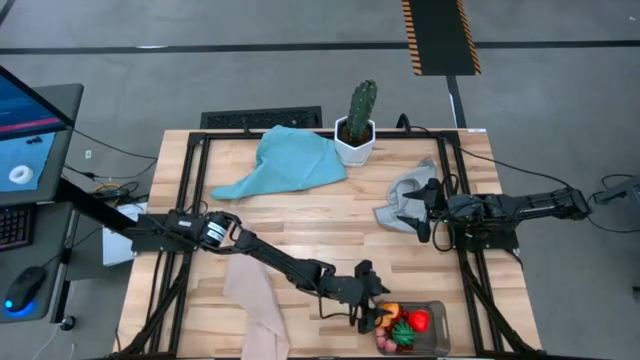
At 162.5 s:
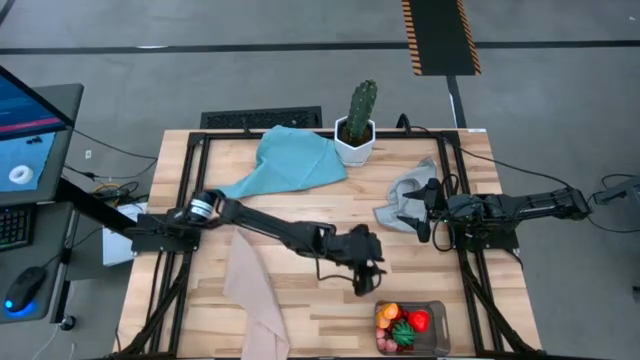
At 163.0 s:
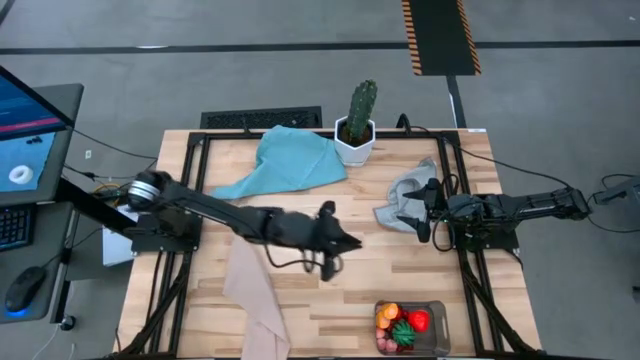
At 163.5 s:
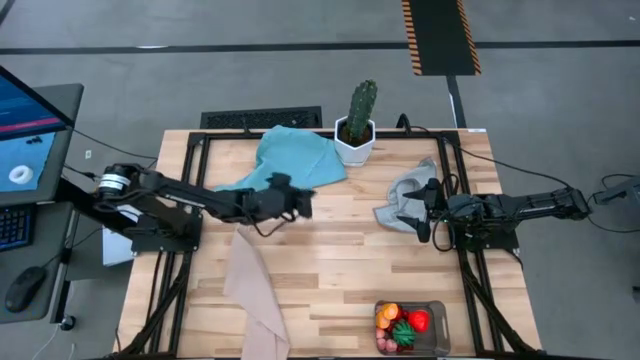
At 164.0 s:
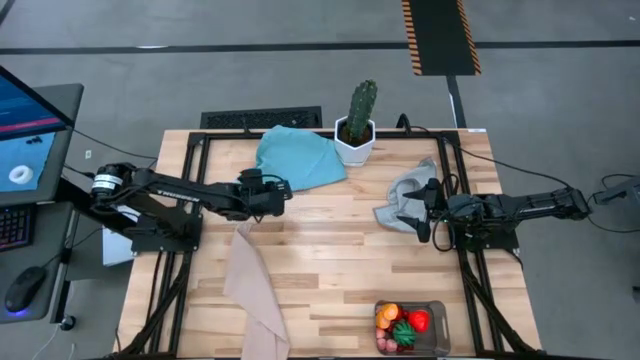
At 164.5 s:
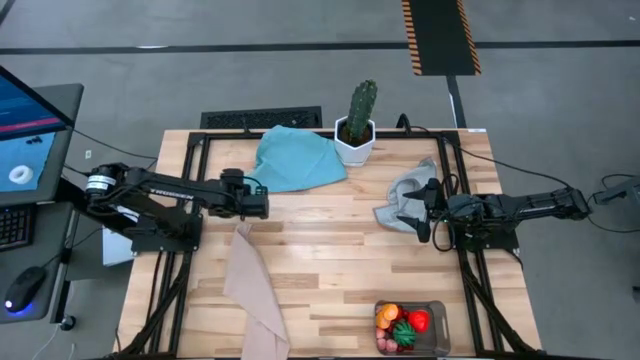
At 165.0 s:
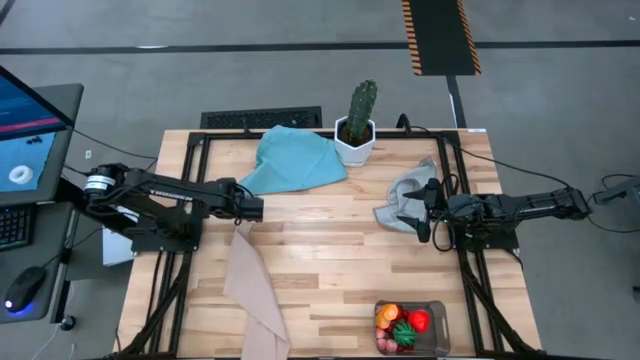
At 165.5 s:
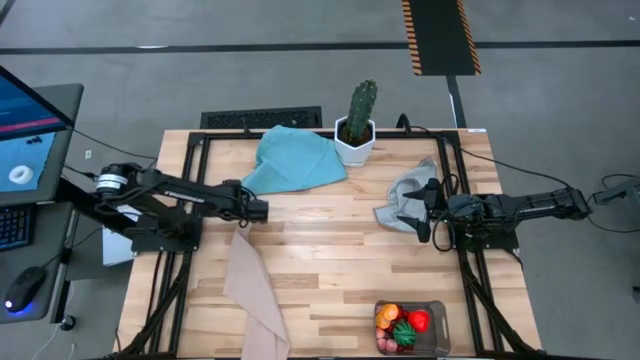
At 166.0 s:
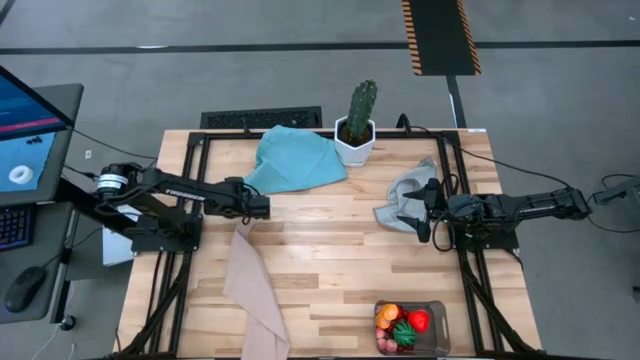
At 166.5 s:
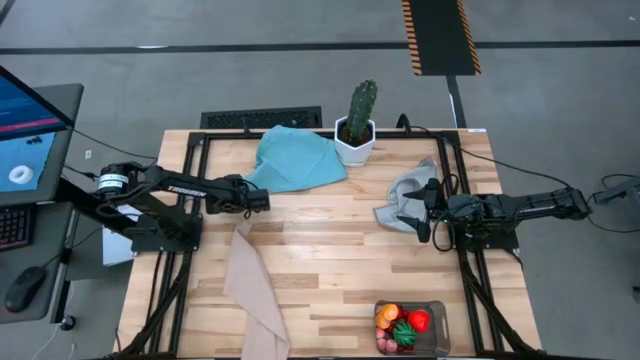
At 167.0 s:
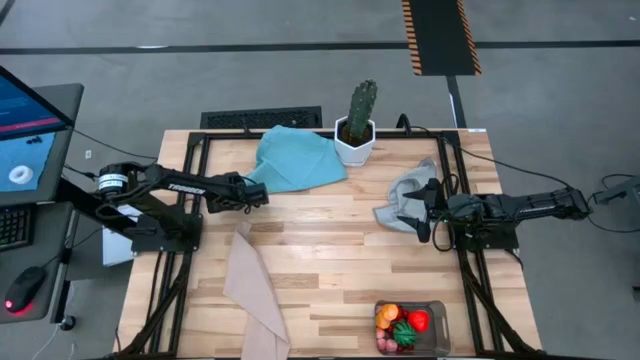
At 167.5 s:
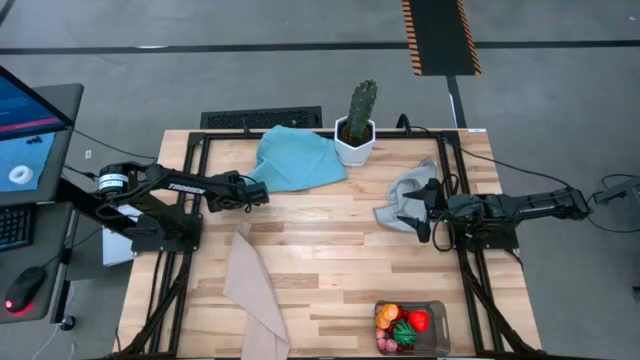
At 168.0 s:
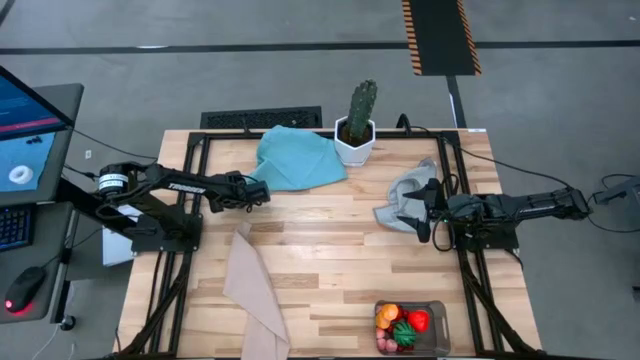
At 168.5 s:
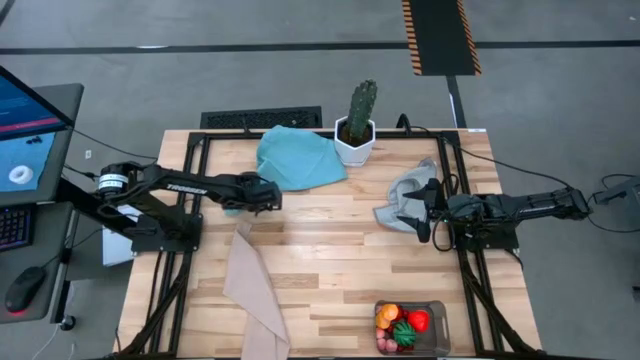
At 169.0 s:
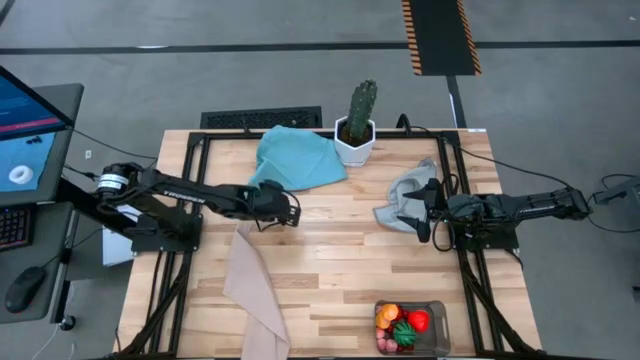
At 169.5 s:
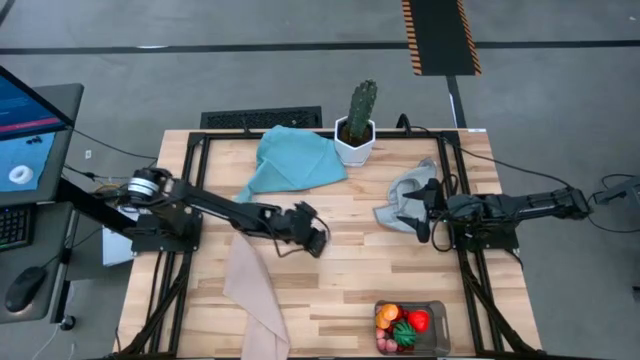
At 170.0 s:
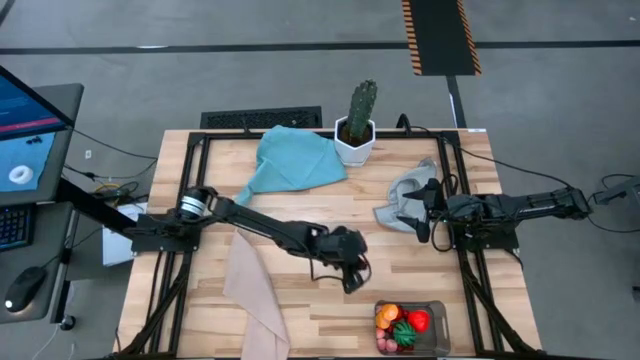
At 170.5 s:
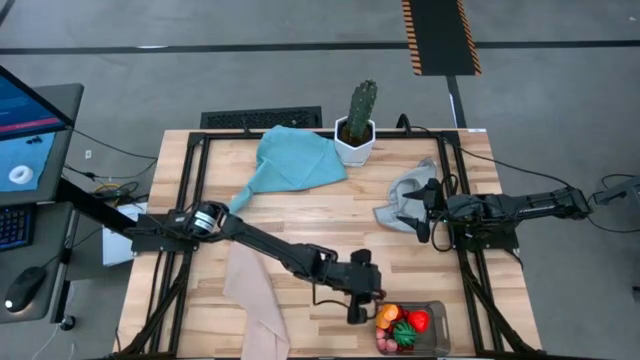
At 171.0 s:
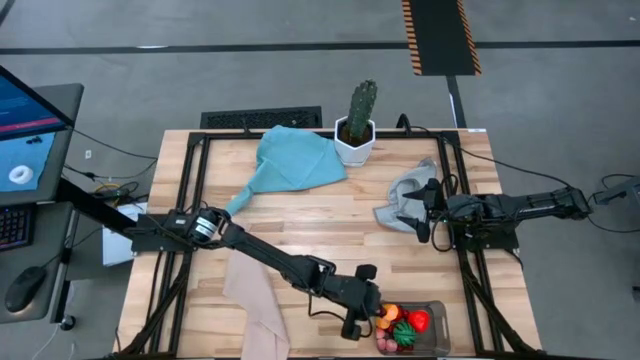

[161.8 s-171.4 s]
Task: Pick and placing Produce into tupperware
Put the cherry into the black bin

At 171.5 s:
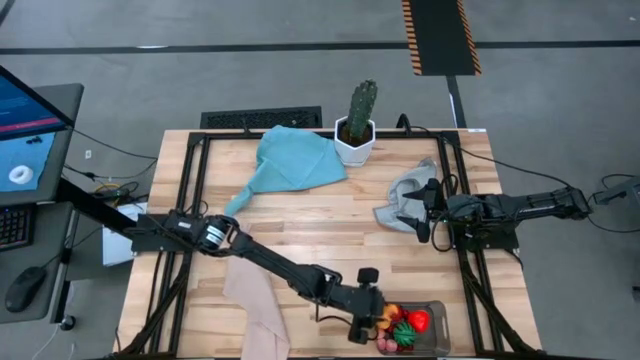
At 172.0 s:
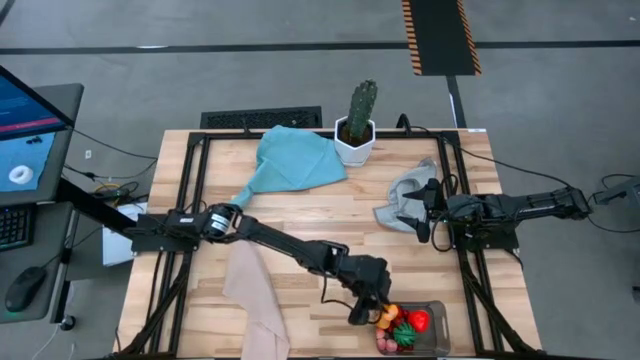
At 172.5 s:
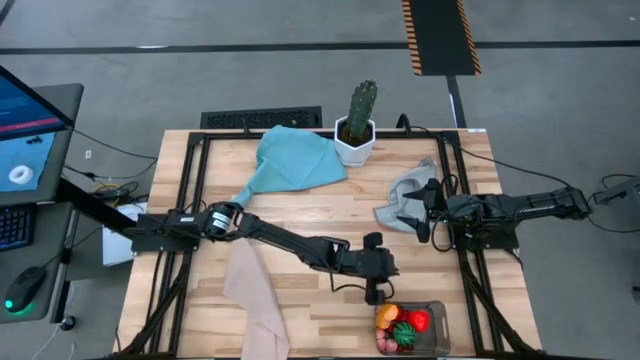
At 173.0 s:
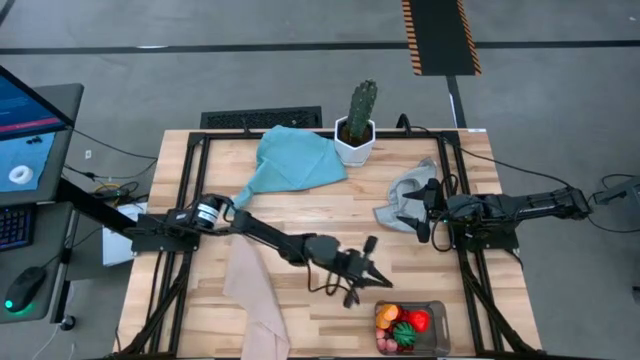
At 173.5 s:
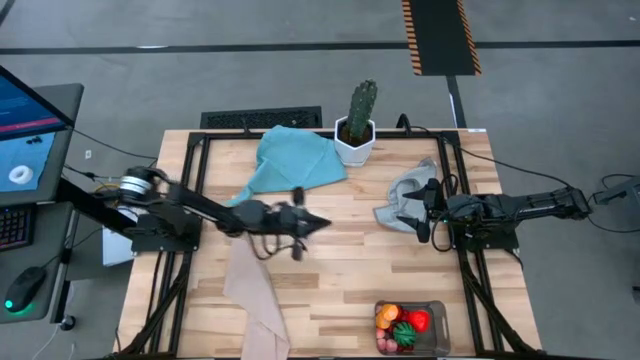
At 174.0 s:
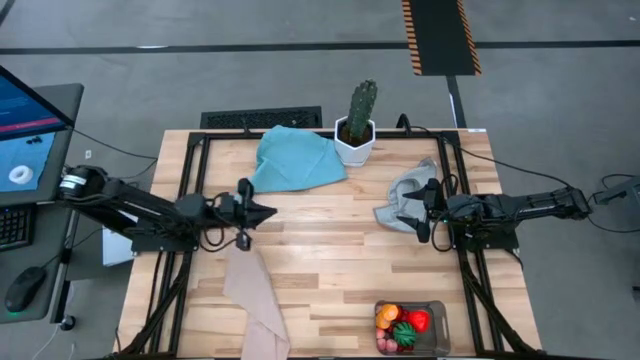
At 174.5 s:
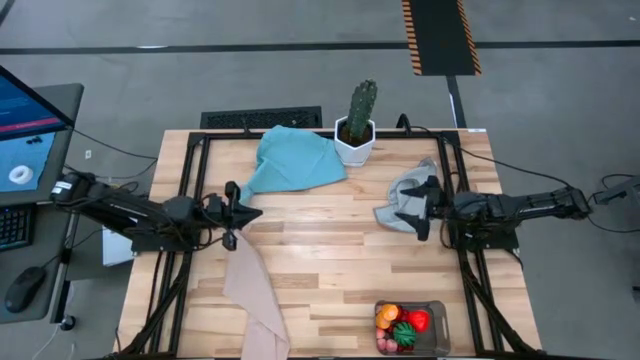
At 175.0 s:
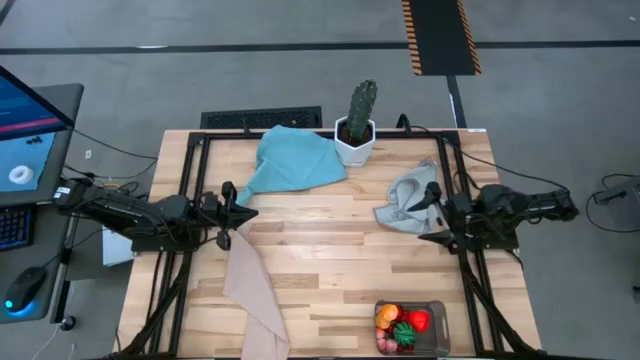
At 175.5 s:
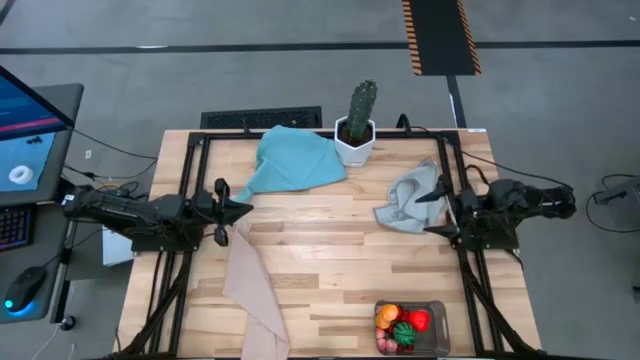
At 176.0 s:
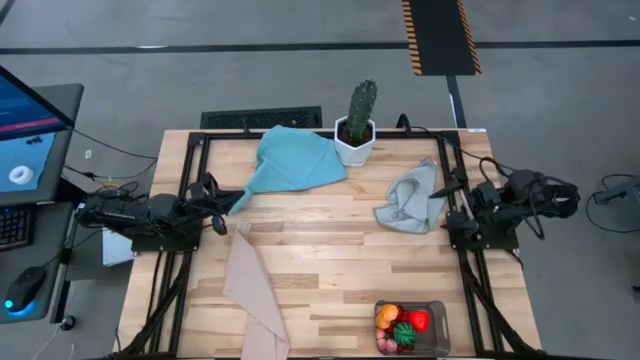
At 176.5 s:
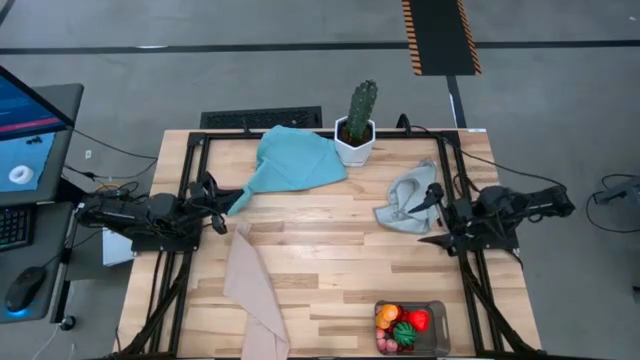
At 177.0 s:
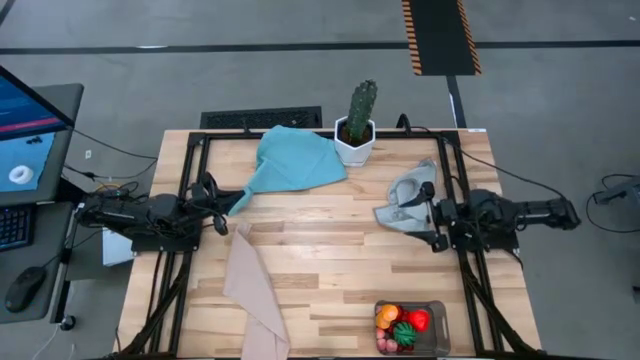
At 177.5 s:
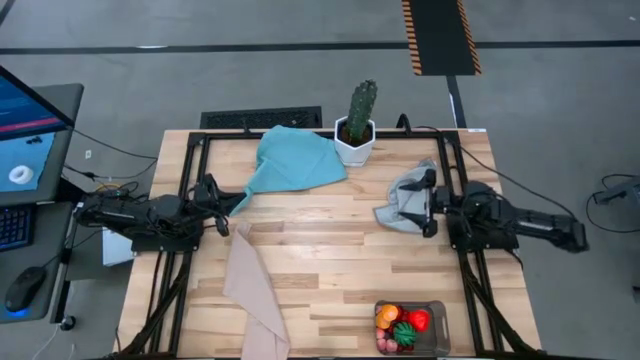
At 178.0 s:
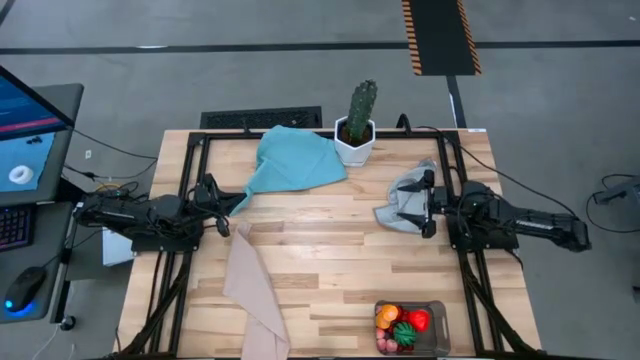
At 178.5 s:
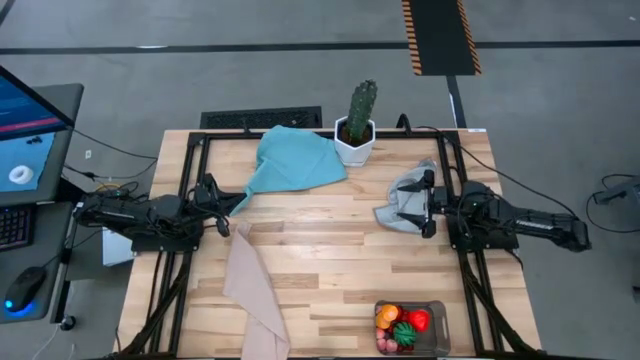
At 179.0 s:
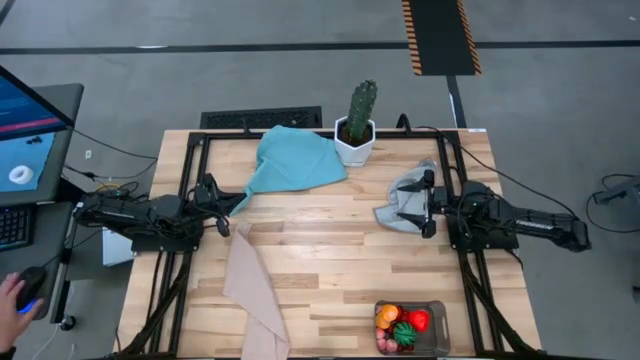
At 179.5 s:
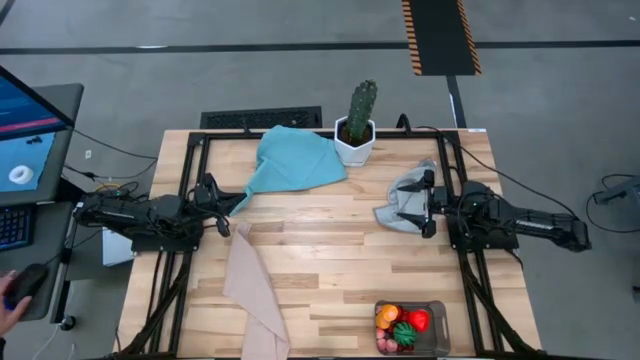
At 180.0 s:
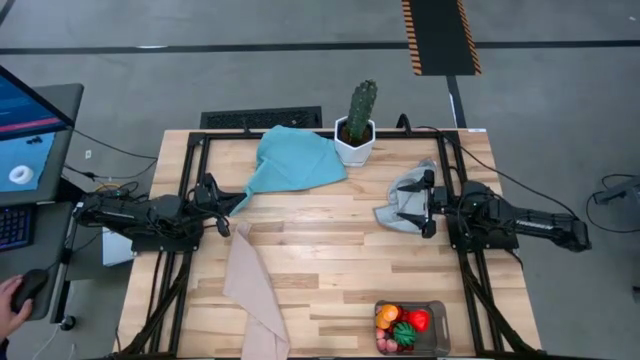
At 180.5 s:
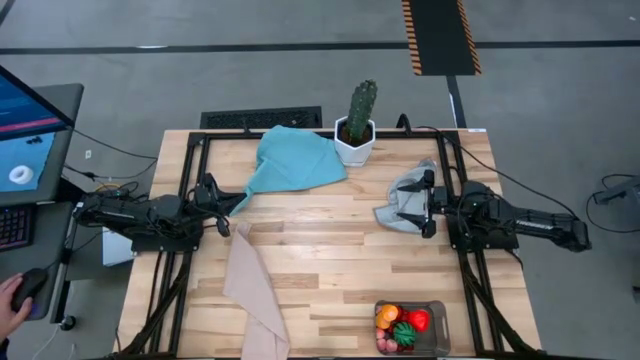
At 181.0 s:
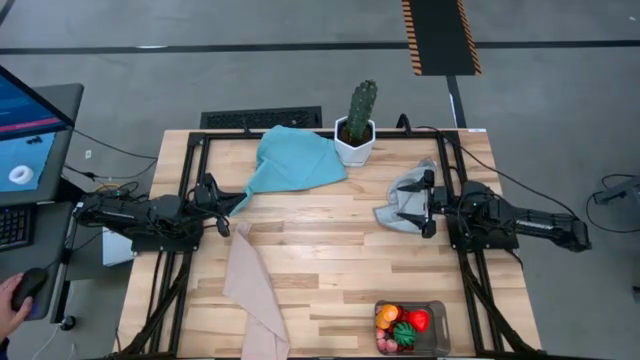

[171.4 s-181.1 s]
Return to Home Position
